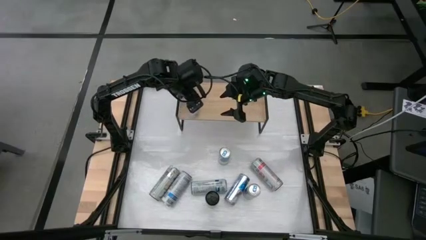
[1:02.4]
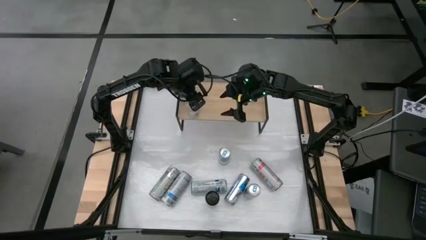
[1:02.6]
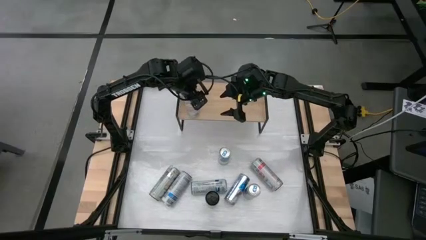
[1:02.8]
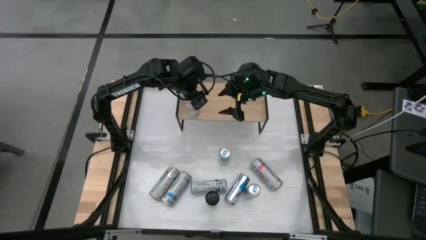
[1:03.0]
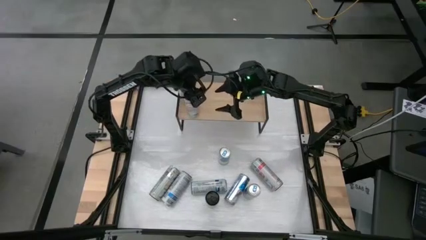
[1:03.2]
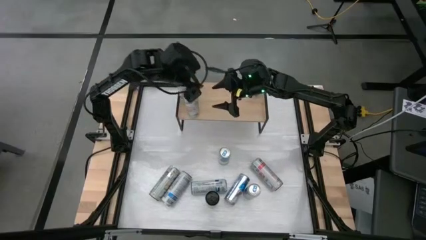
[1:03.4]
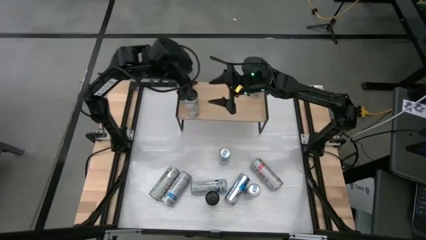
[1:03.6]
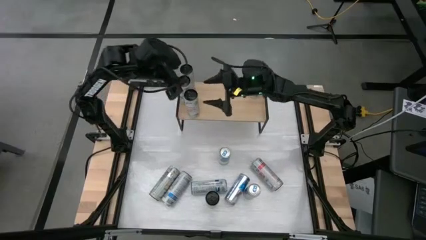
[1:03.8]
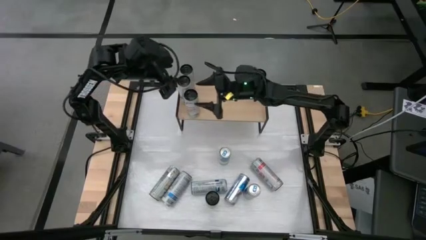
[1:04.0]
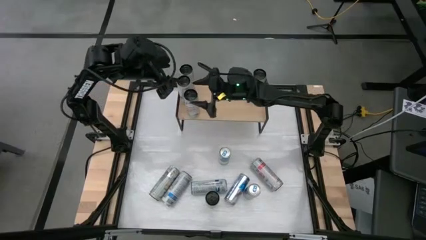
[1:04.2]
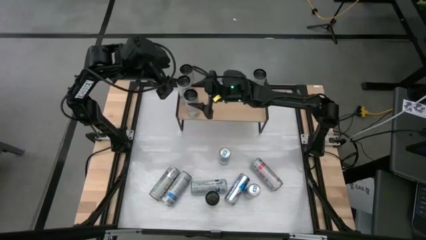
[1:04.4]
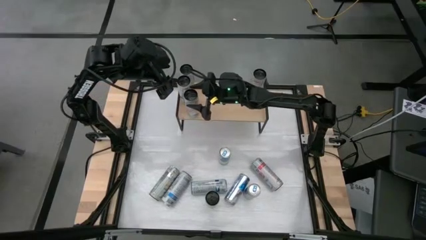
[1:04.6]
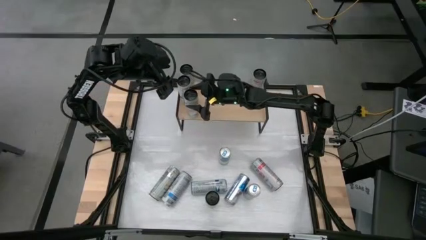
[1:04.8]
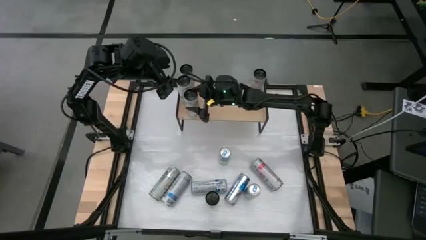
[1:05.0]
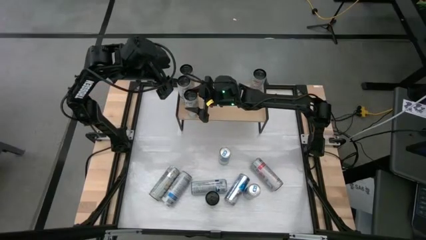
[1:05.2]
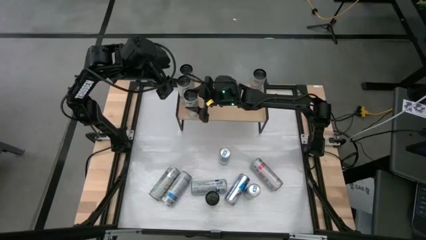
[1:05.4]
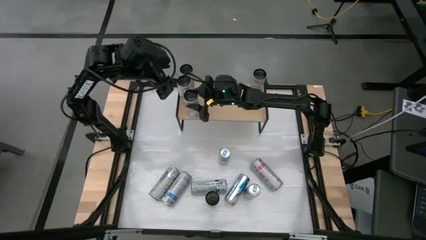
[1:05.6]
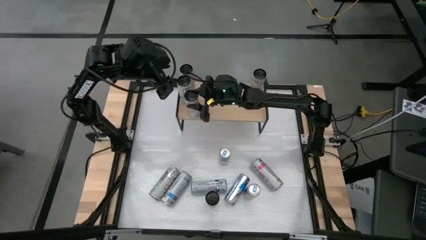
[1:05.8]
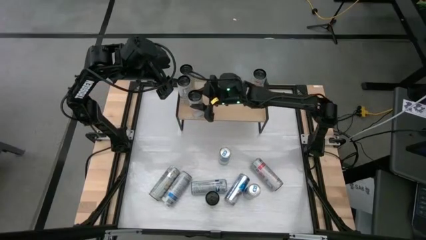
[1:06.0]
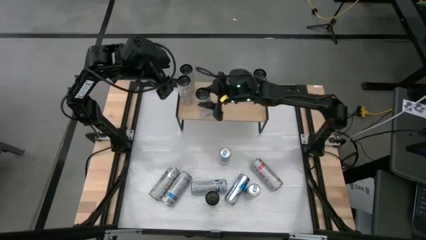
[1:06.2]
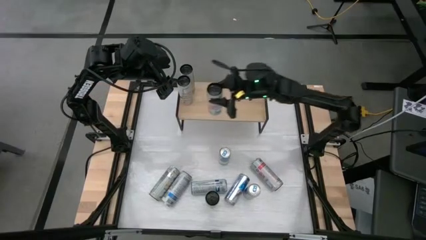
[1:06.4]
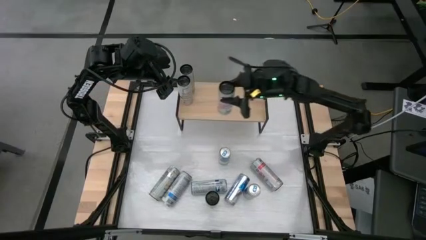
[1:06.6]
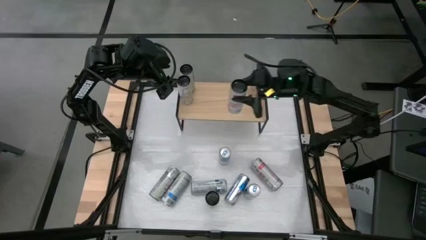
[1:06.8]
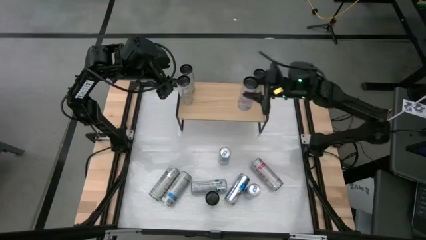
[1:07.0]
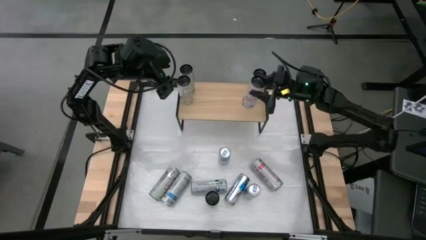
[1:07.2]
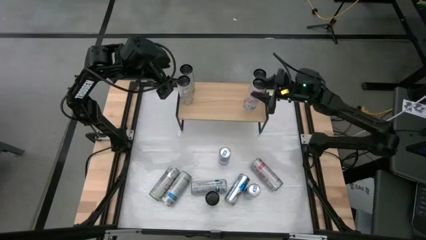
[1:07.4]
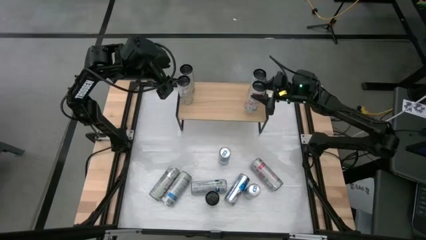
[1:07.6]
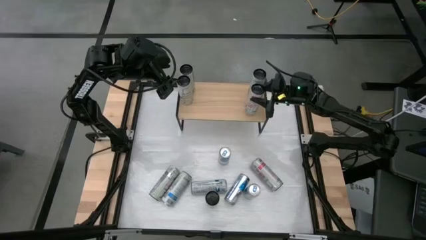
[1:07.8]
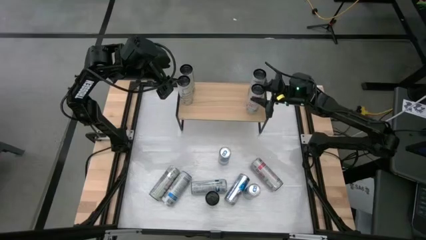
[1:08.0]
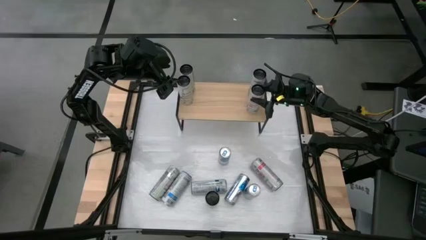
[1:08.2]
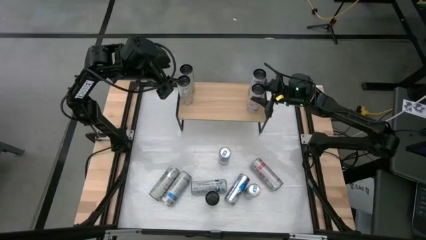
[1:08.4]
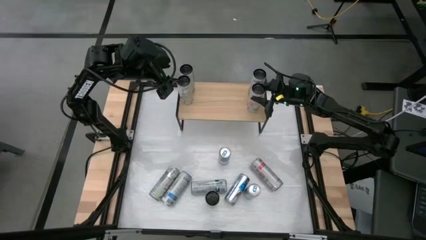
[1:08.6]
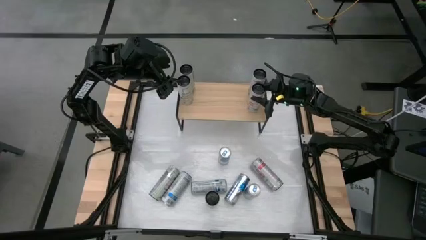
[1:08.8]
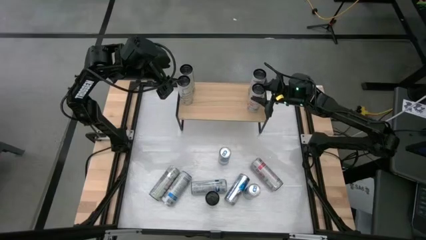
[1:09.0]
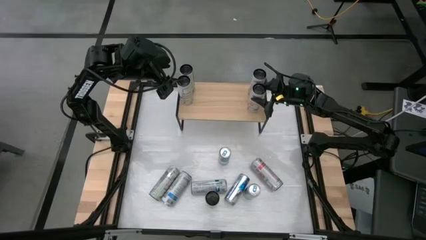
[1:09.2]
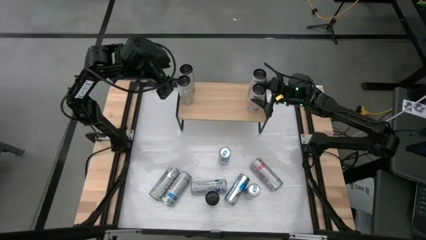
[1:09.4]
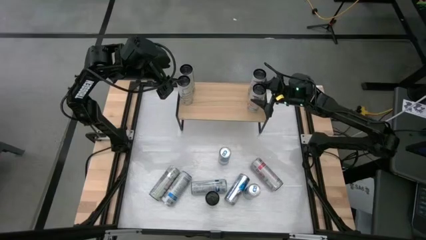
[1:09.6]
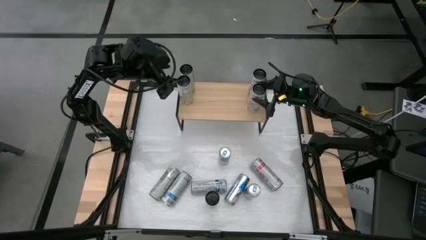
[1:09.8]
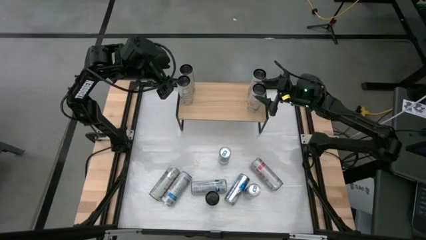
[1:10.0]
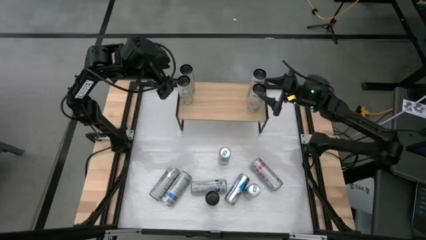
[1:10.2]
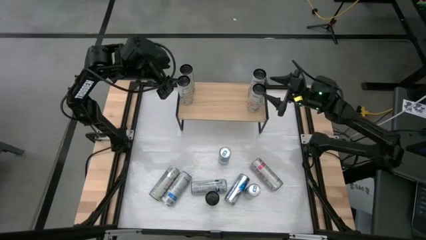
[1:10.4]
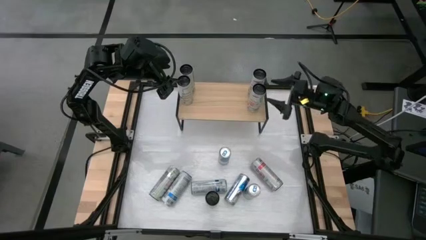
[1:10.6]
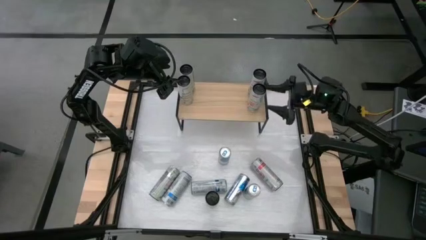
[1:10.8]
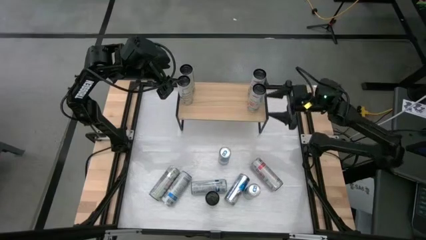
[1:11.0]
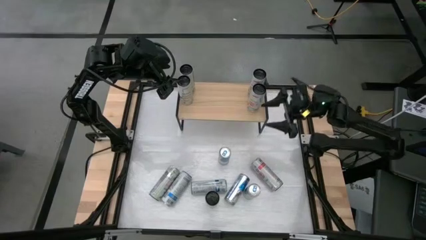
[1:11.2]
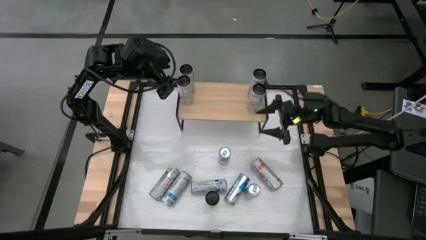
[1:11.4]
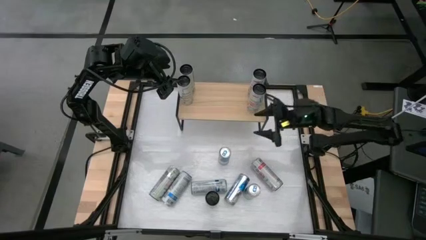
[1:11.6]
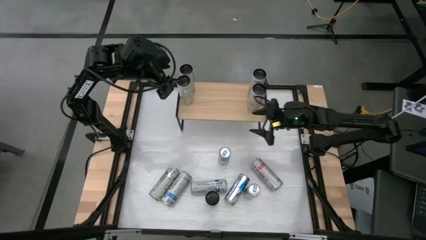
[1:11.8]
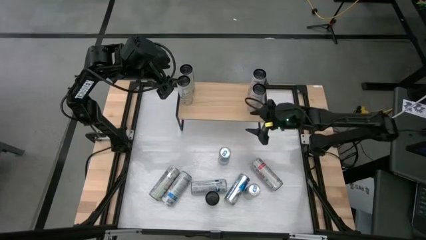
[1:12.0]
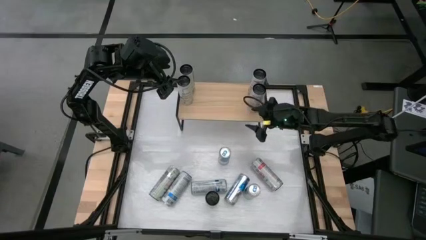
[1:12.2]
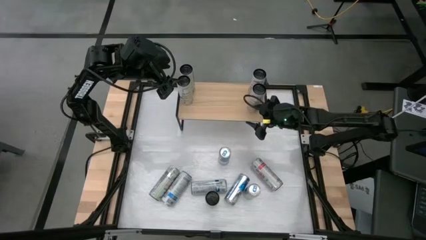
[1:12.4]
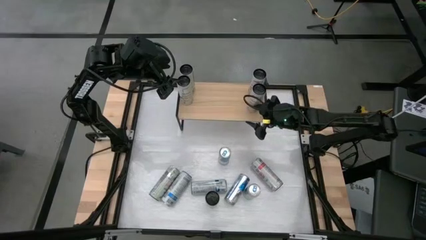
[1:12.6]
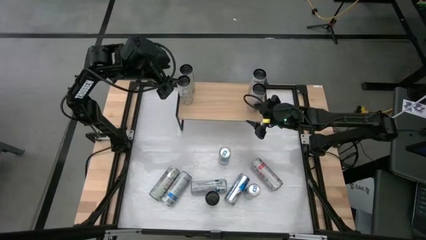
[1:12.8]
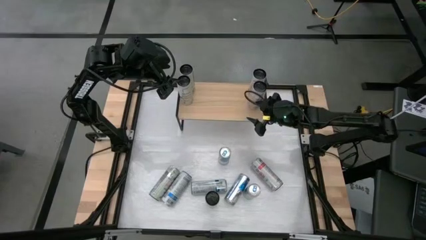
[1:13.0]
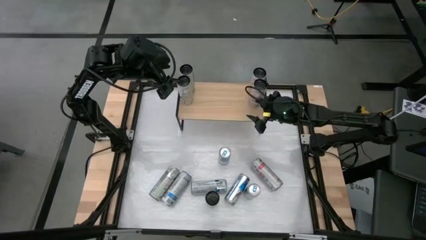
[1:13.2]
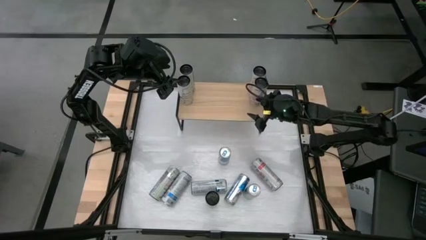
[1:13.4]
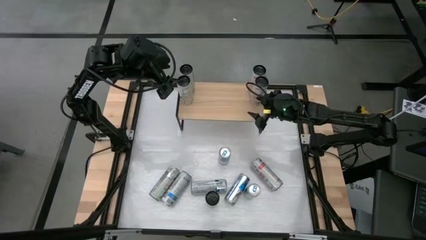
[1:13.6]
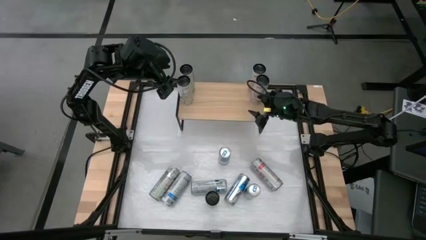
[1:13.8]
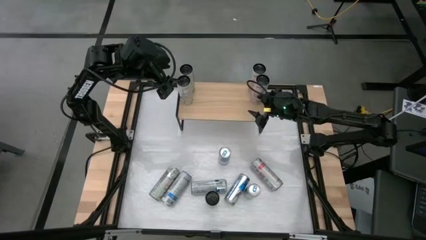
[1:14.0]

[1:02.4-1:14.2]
Task: Sort soda cans
Put the left white pink soda can on the shelf and align with other white pink soda cans

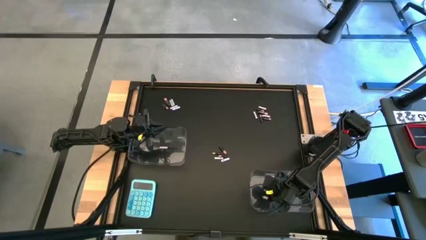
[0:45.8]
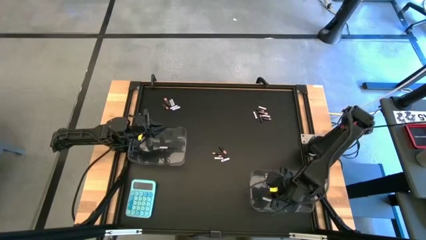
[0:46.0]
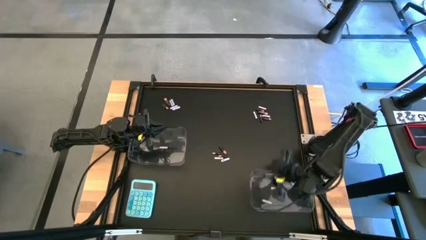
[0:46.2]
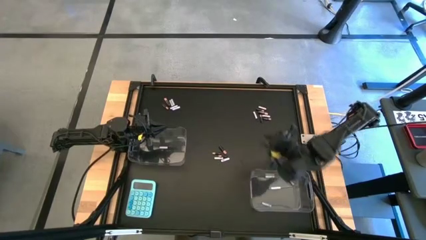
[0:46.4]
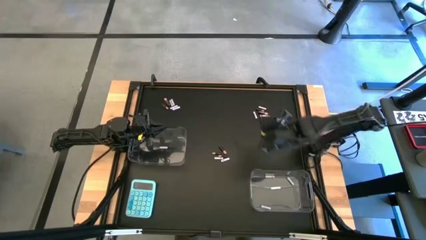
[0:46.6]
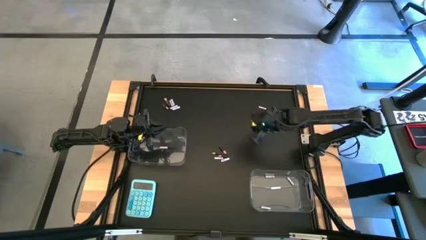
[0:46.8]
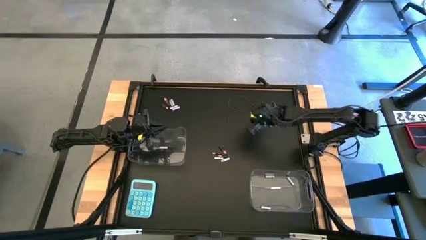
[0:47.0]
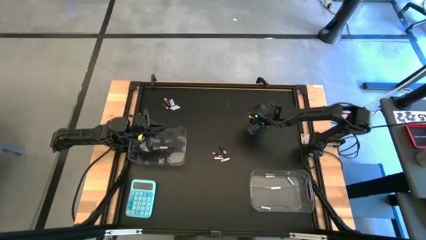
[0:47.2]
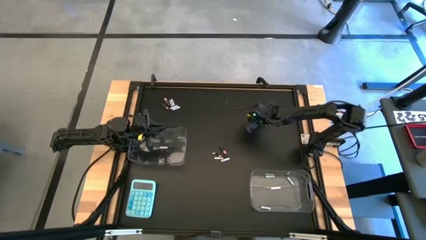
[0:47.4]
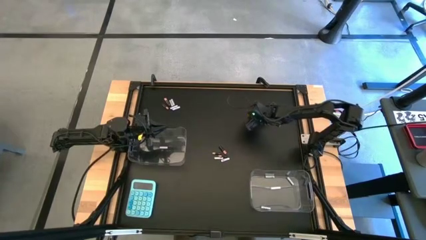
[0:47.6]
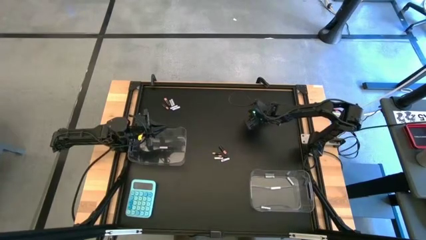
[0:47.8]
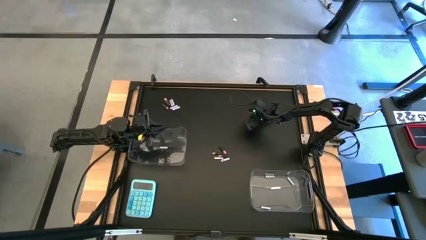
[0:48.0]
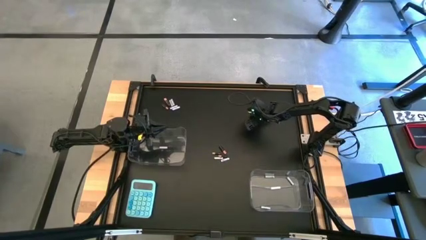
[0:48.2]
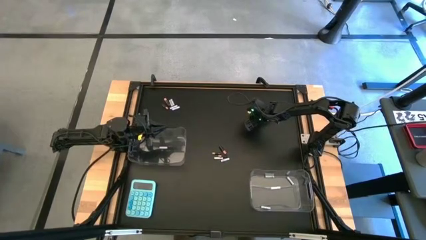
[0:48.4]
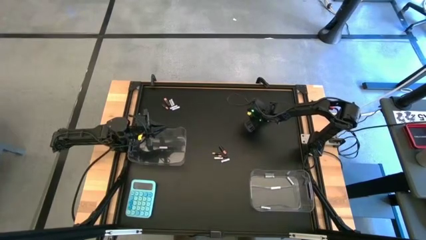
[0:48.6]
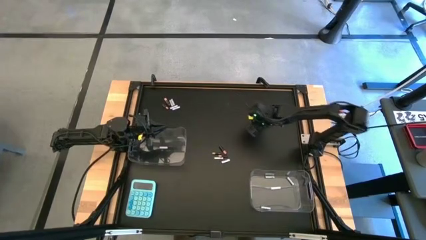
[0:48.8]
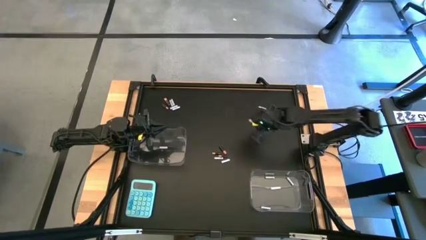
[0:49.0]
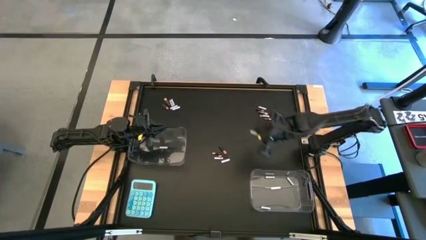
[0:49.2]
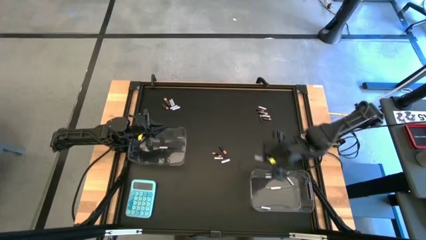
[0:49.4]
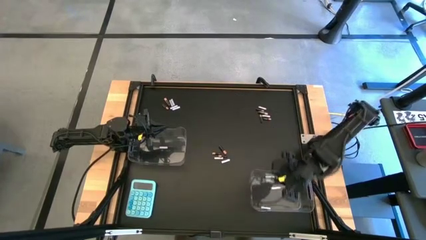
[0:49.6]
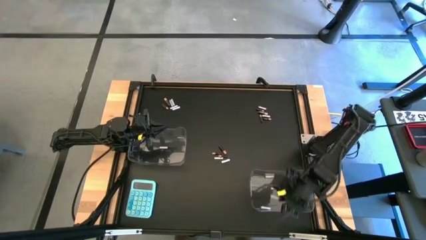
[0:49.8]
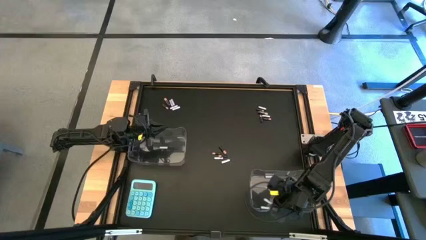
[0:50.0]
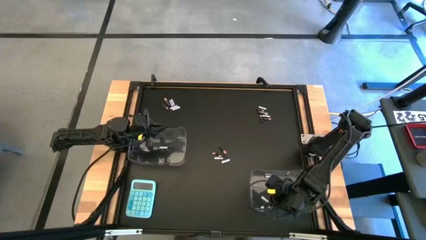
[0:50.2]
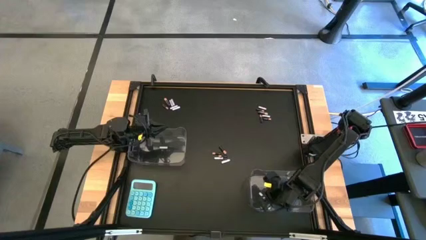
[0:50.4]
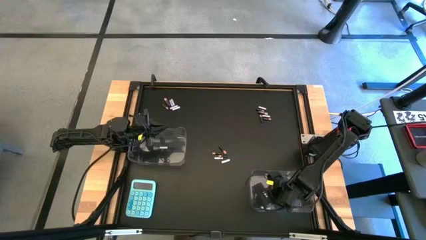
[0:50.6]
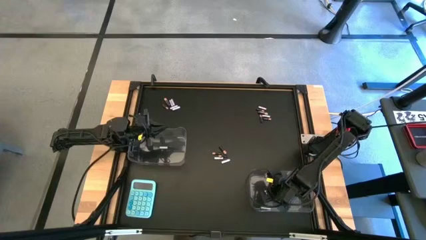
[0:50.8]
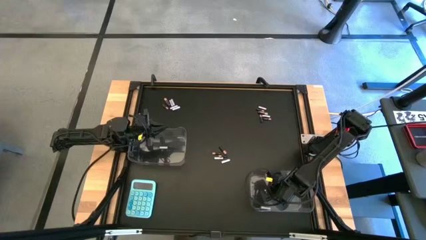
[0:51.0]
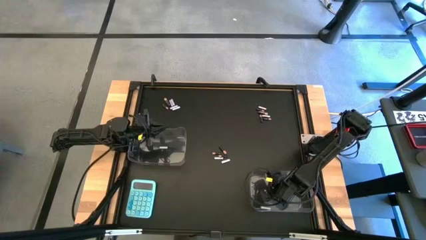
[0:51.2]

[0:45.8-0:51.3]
Task: Sort batteries
Put the white battery into the right transparent bin
